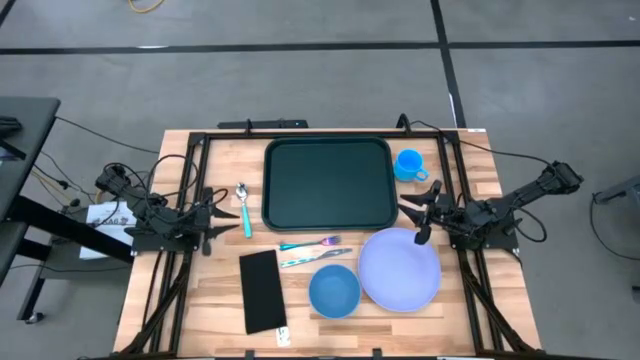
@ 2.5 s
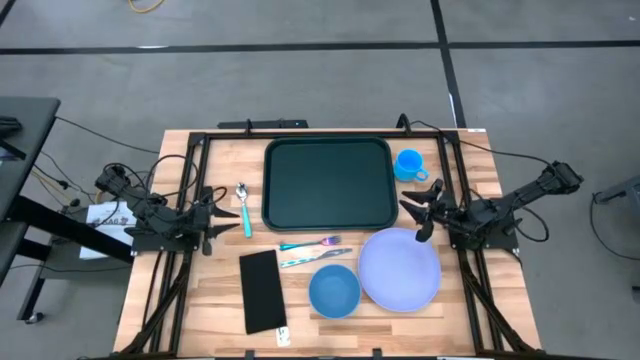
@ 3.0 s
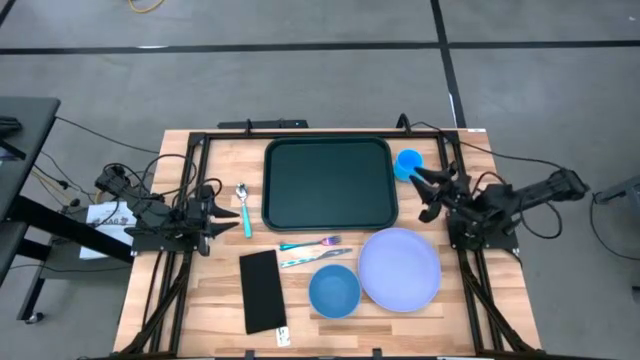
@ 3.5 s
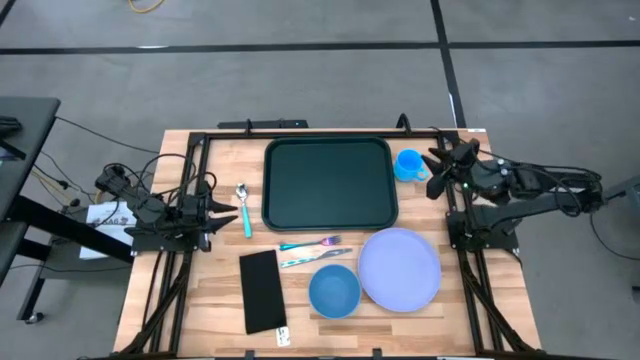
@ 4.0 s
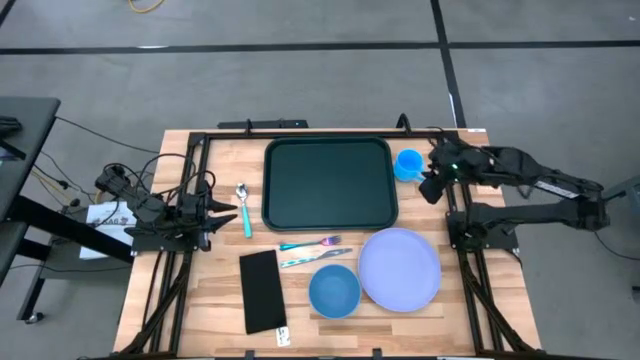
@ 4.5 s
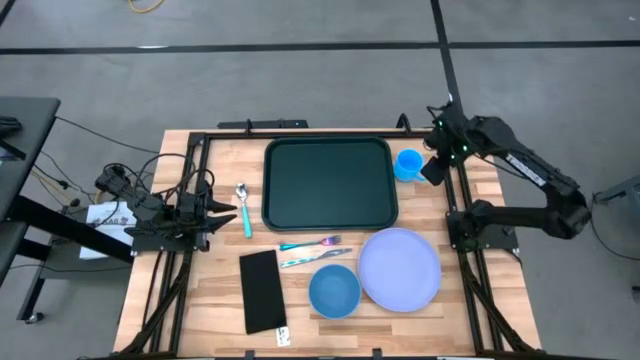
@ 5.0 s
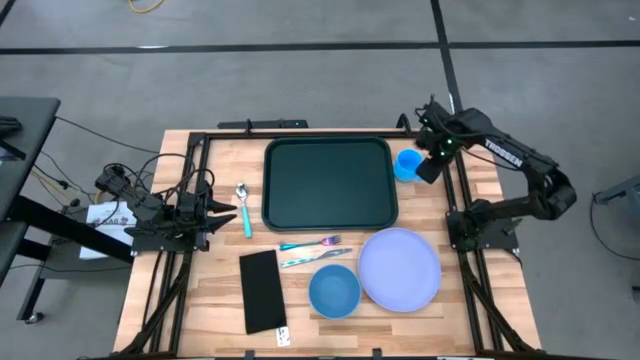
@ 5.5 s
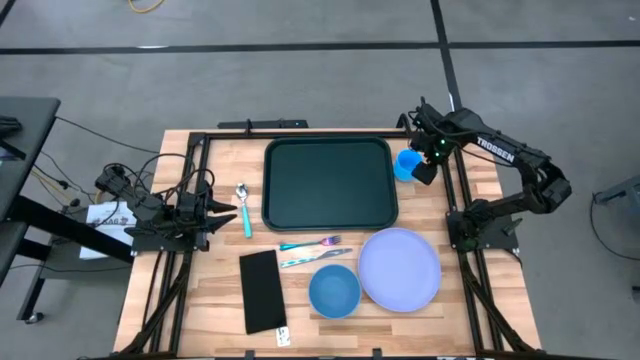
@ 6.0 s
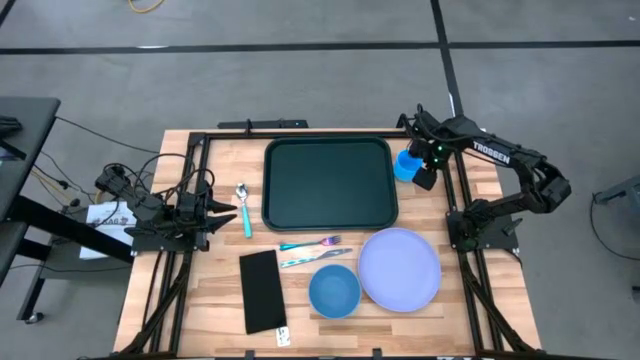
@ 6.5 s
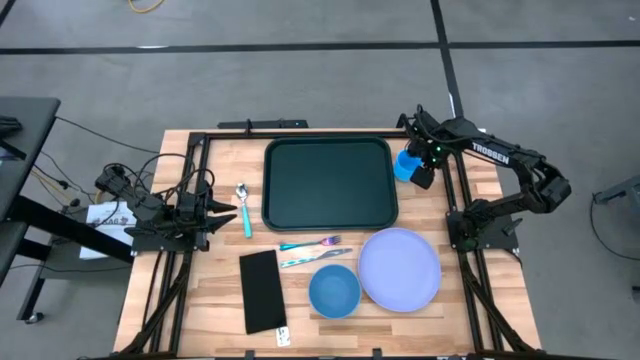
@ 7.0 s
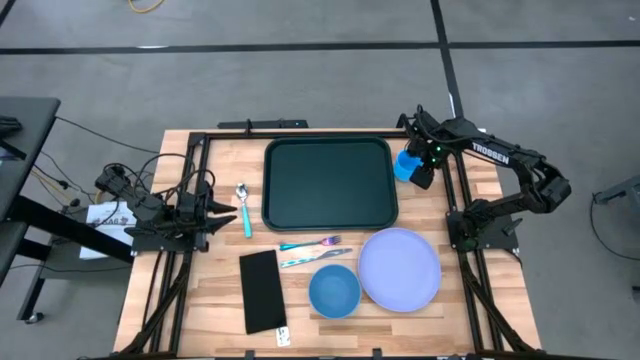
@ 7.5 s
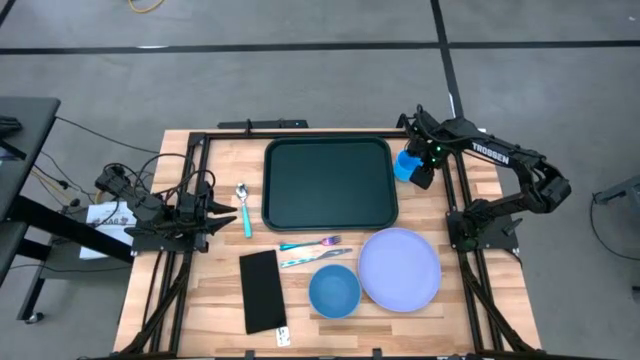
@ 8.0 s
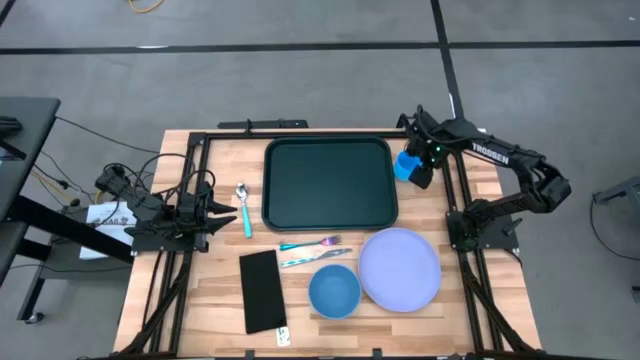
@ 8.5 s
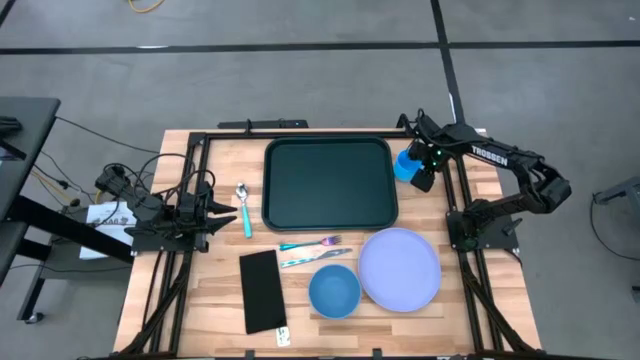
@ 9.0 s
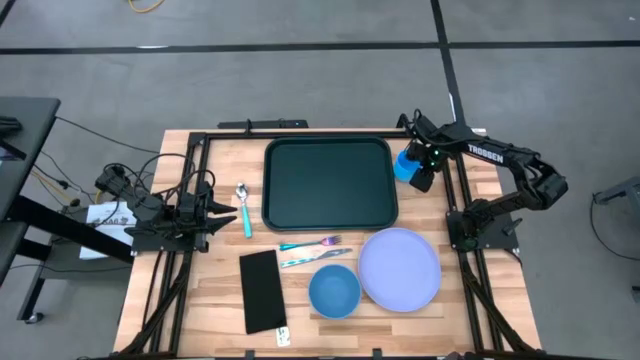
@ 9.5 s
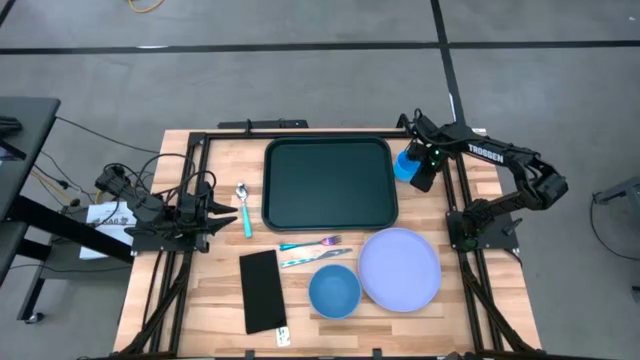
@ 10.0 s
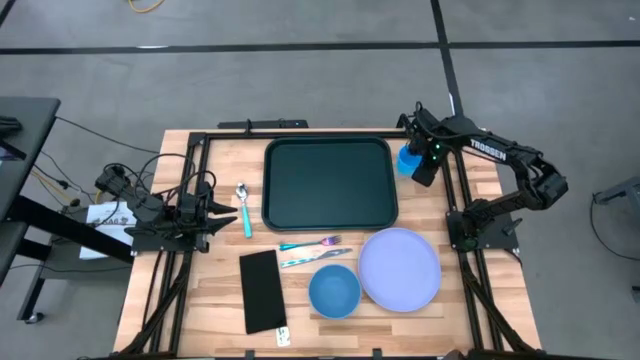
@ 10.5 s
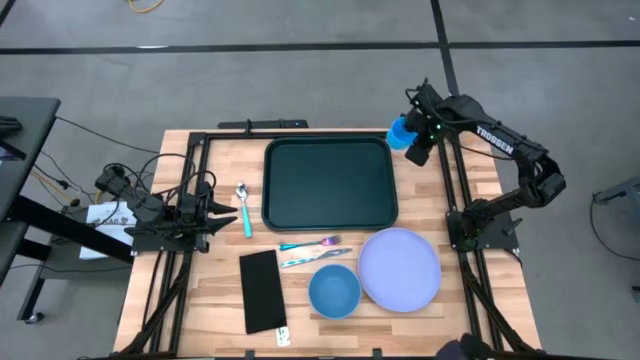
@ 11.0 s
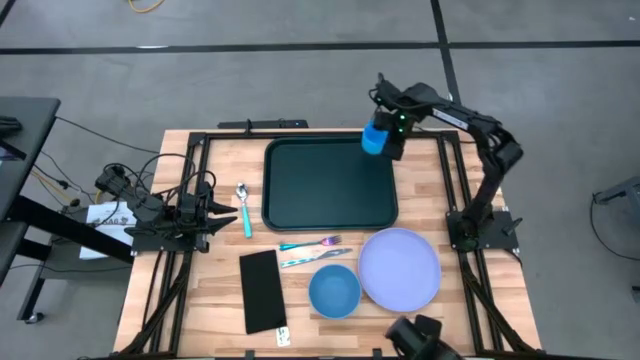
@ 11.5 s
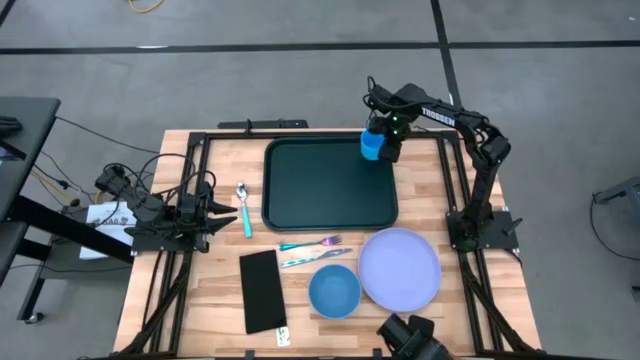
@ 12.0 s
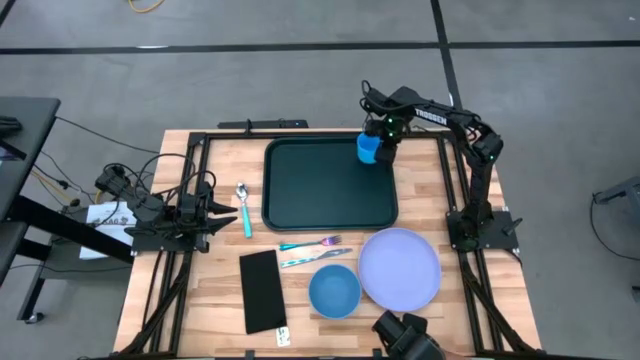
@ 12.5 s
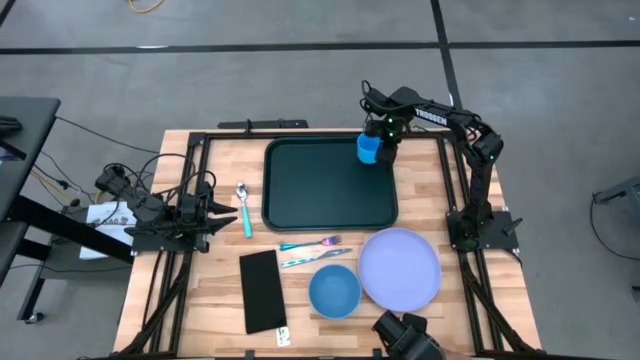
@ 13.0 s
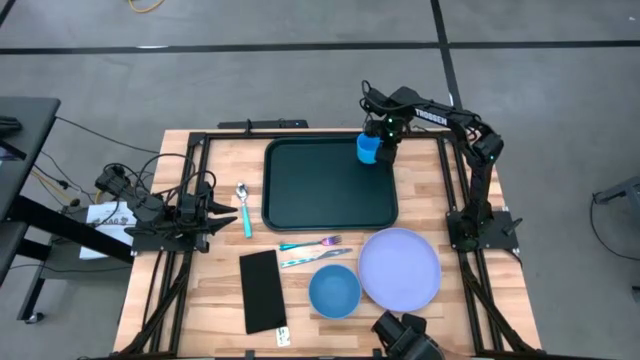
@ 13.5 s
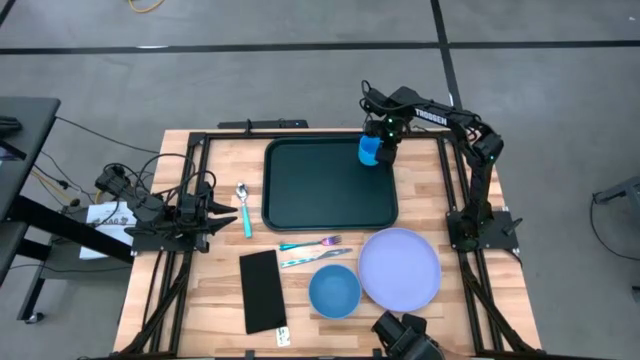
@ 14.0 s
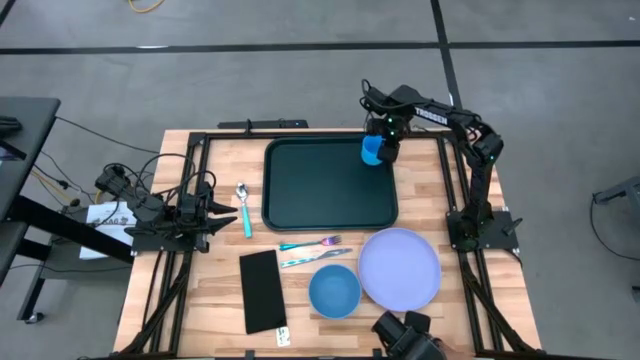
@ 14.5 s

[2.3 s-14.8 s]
Task: Set up tray
Put the light blue mug in the top right of the black serving tray

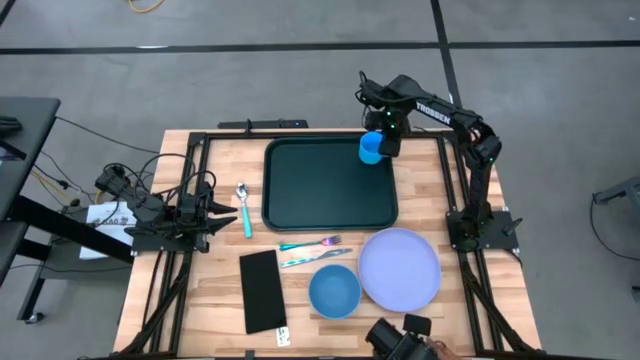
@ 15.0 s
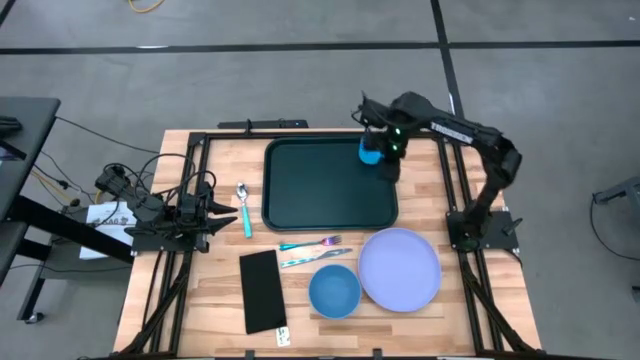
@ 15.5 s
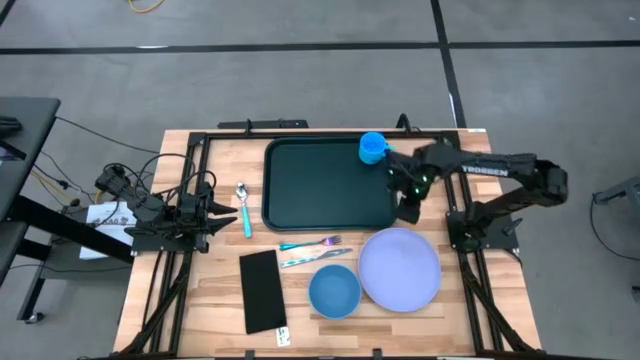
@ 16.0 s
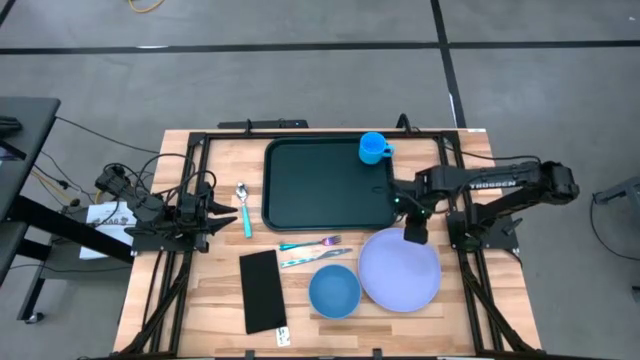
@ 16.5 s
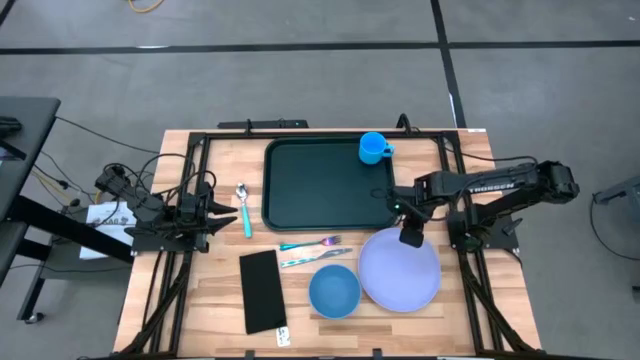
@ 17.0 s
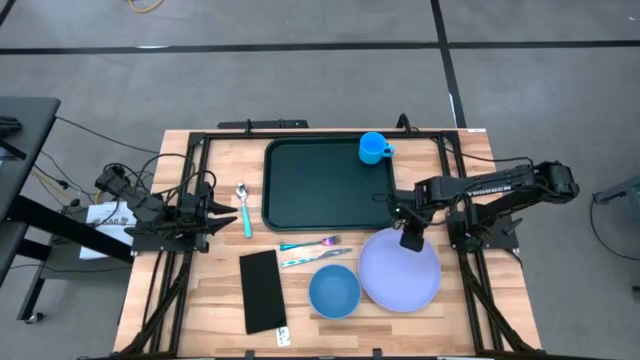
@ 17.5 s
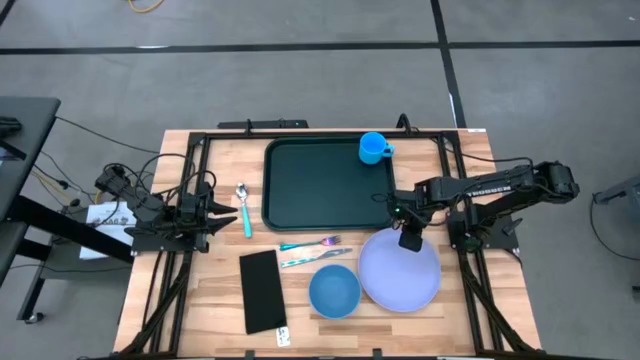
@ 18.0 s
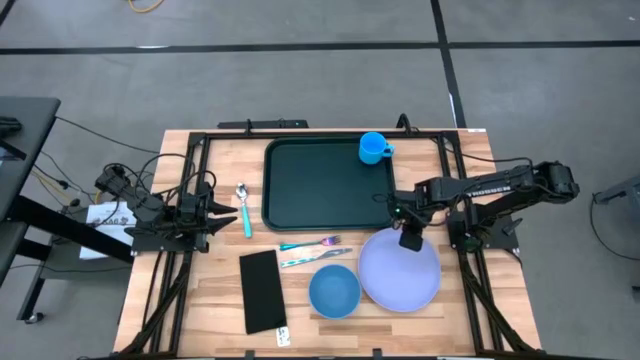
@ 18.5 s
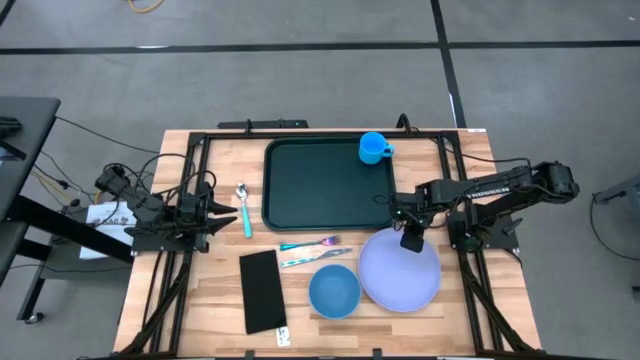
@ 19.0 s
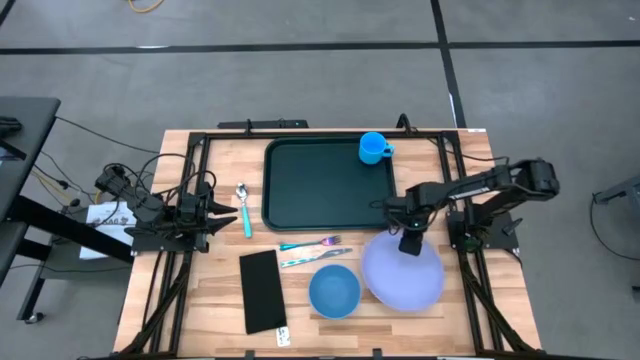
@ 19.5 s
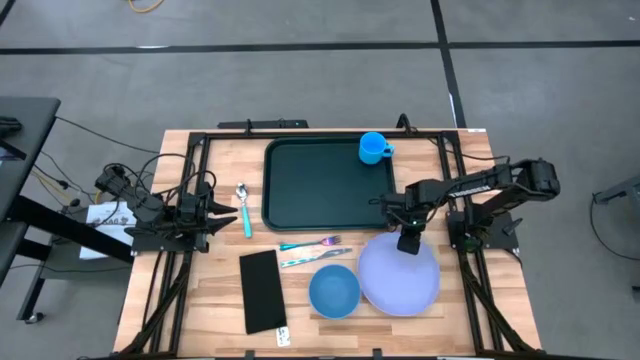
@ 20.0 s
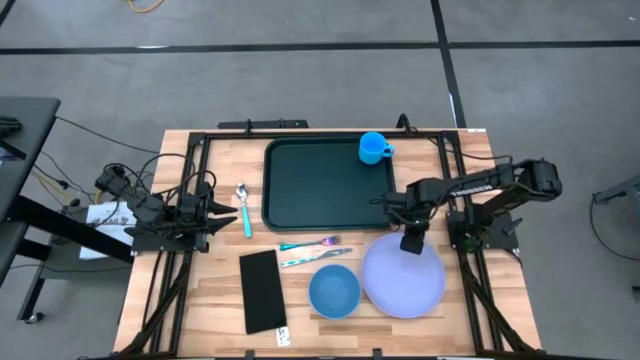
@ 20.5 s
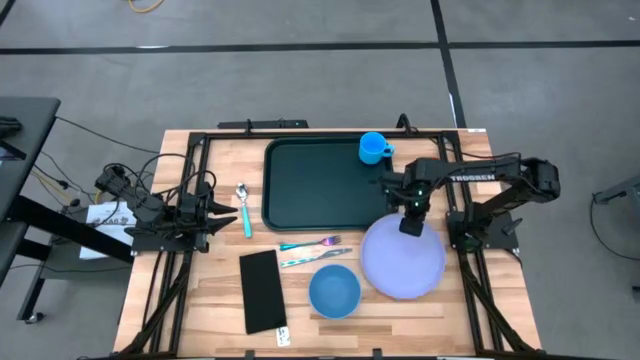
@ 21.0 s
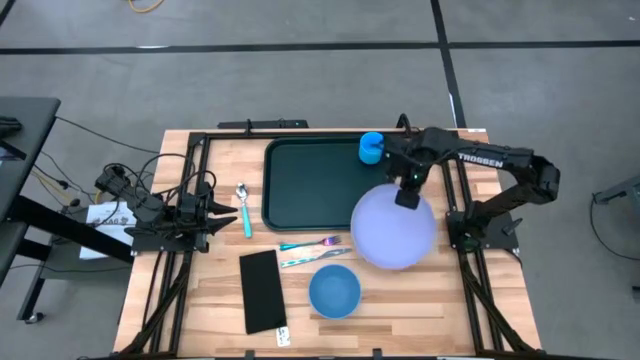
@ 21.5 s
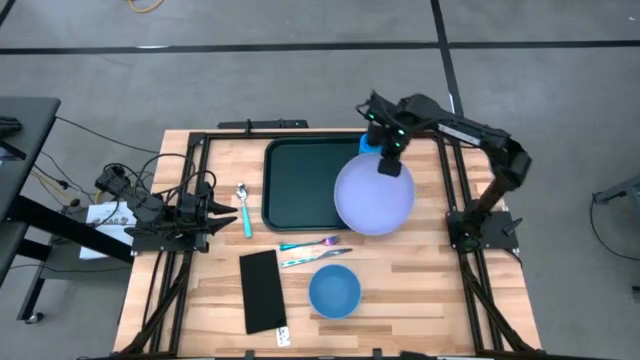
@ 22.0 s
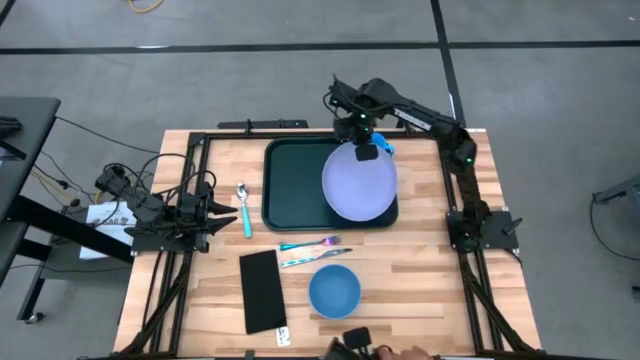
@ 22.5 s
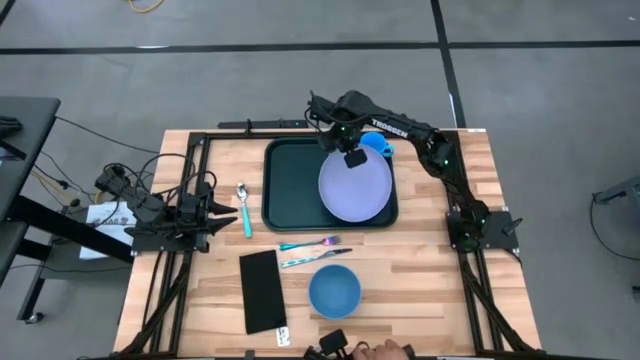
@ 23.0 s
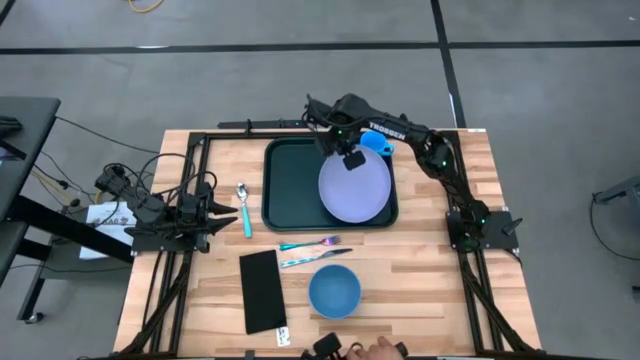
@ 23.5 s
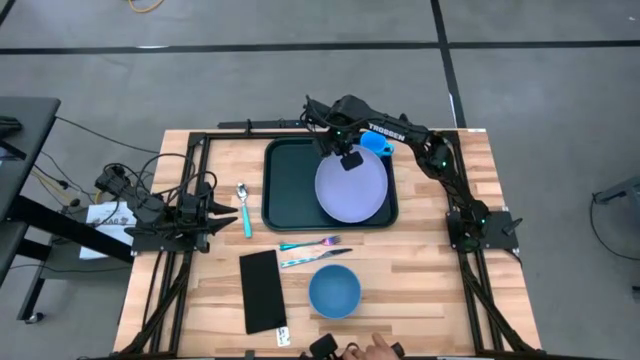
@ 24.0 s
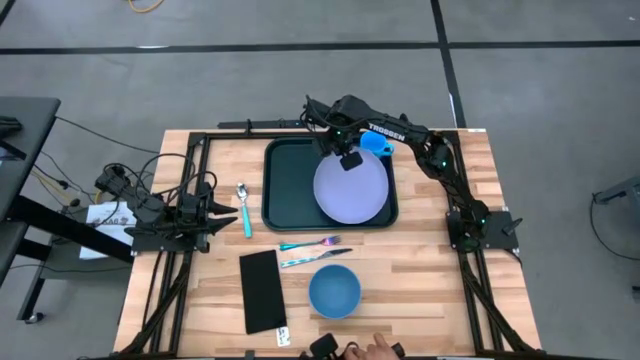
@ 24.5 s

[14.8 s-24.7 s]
Put the light purple plate in the bottom right of the black serving tray
